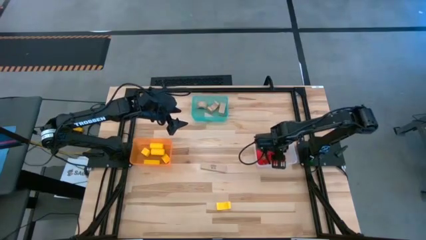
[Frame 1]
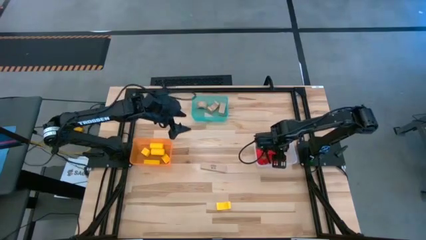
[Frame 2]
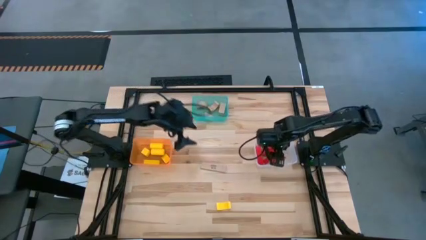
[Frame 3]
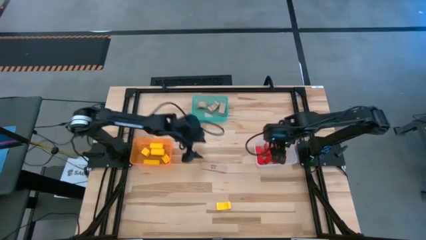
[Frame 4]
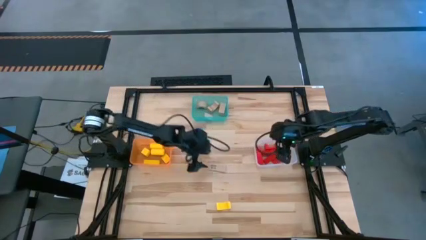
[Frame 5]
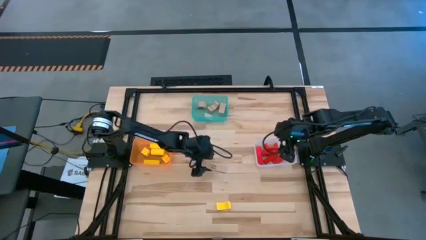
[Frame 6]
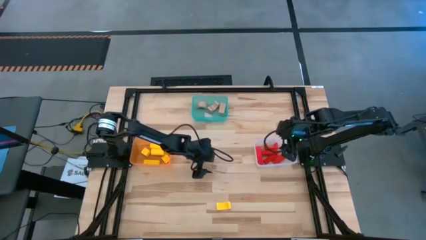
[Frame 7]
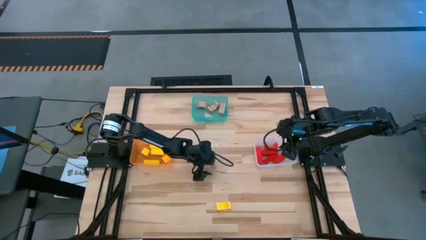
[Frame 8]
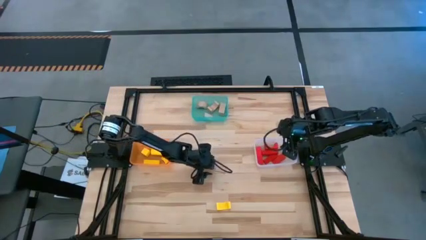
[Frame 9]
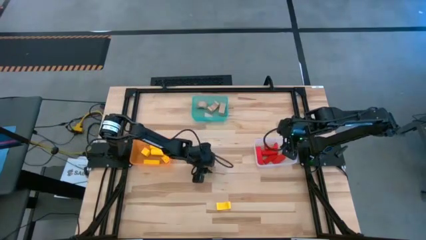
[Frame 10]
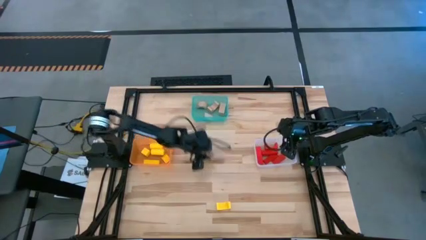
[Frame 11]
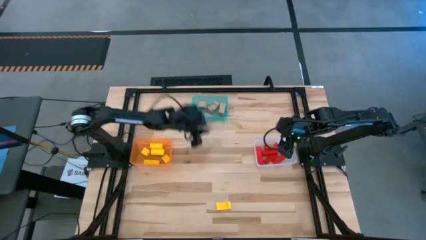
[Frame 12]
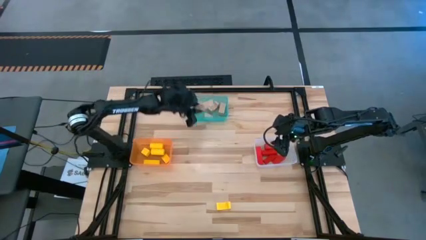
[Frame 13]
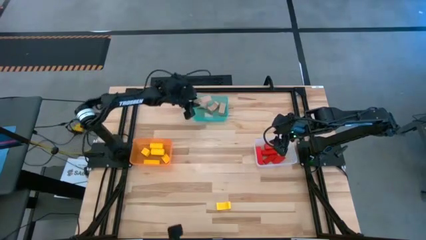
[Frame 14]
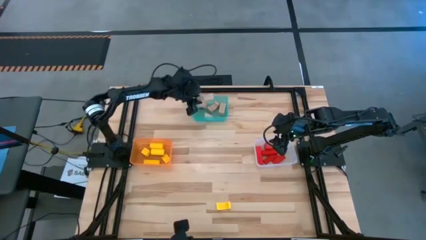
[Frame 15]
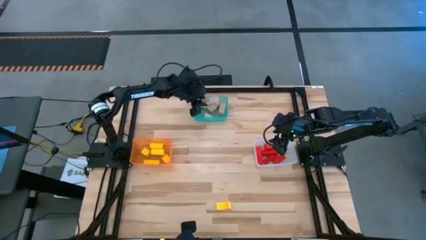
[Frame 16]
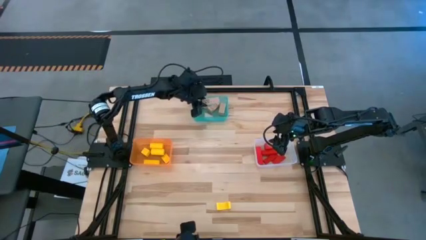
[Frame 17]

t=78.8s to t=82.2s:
Task: Sort & place blocks by color
Put the brown block into the green bin

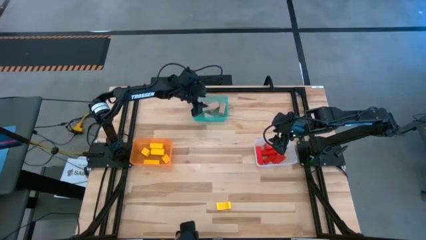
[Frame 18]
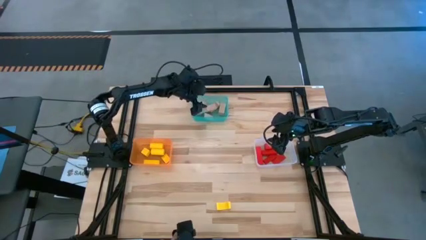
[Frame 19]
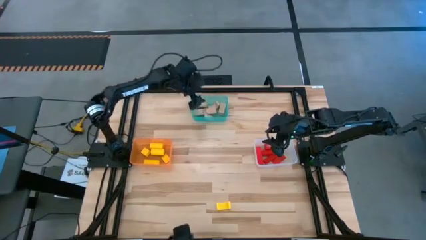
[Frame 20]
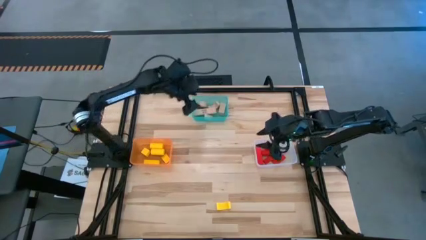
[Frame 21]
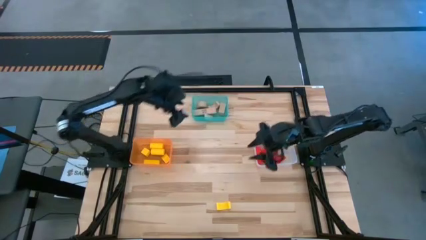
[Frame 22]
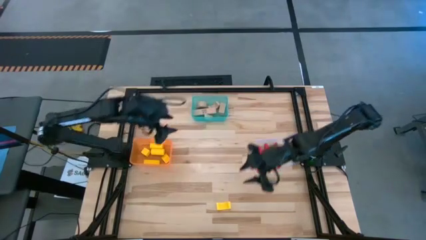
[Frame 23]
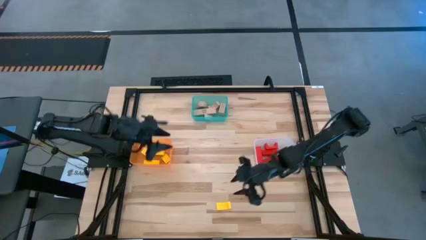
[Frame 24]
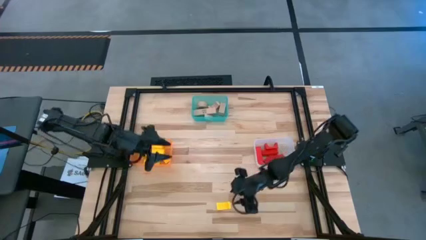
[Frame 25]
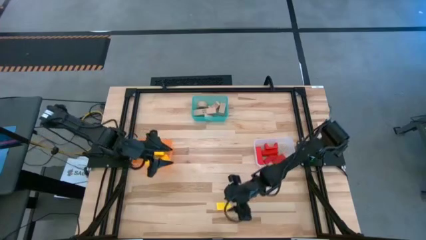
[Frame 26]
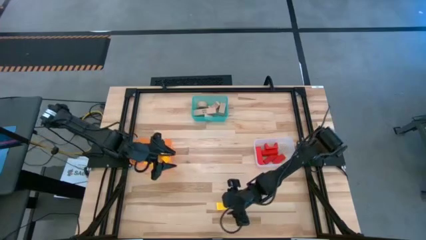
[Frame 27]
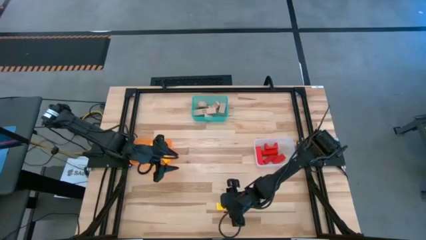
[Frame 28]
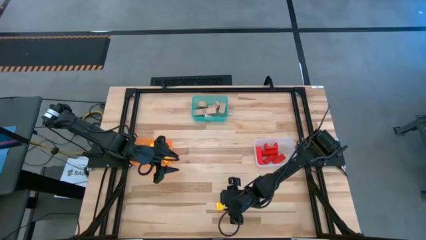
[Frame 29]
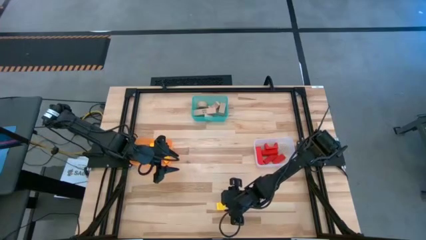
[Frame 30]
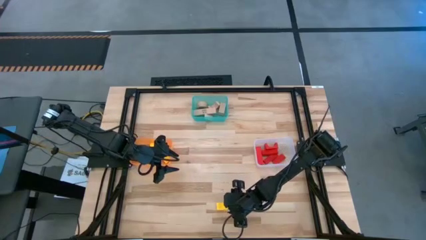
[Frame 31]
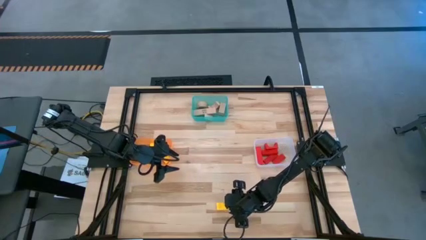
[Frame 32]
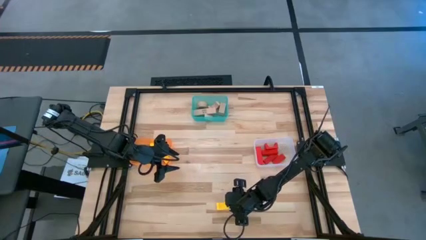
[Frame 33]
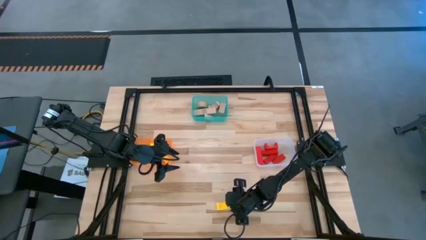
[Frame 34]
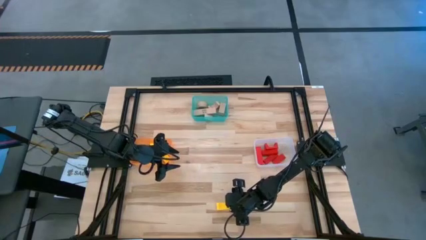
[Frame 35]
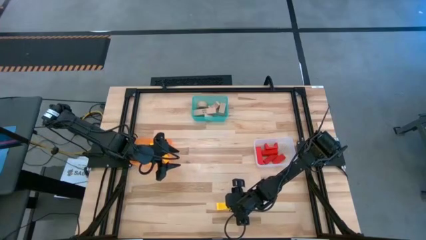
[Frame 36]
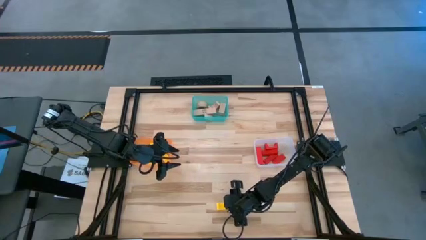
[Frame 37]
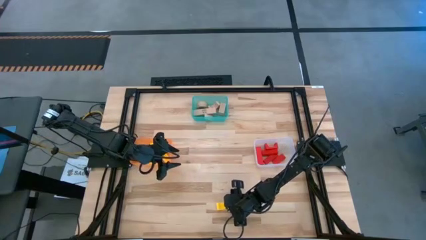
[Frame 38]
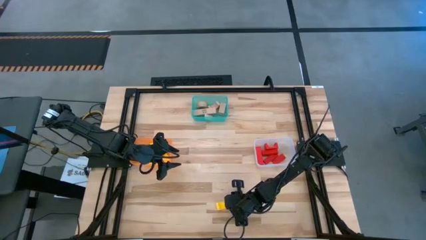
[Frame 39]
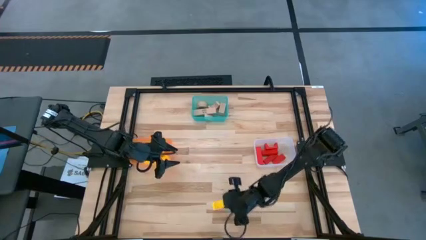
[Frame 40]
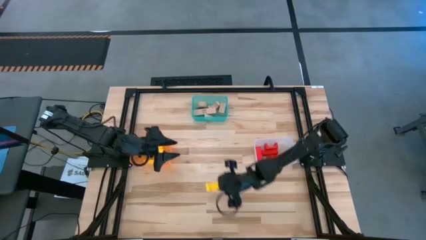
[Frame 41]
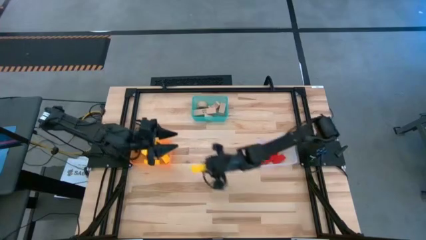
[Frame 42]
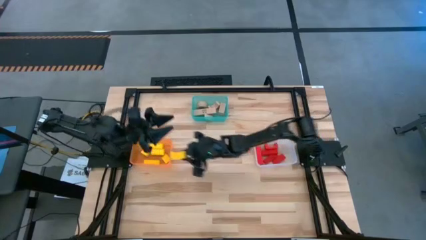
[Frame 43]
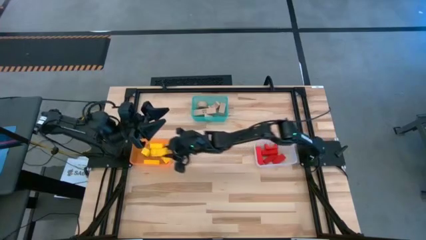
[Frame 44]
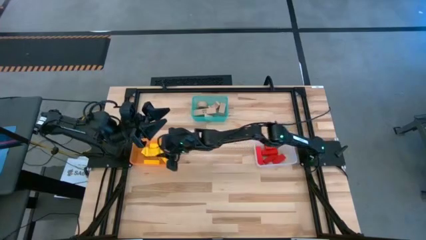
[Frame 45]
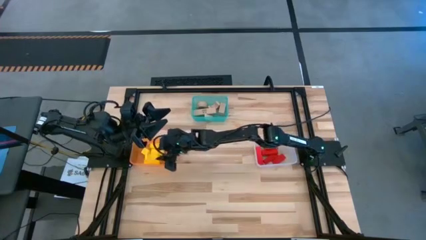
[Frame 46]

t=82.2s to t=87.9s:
Put the yellow block into the orange bin

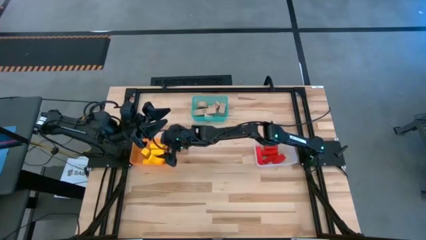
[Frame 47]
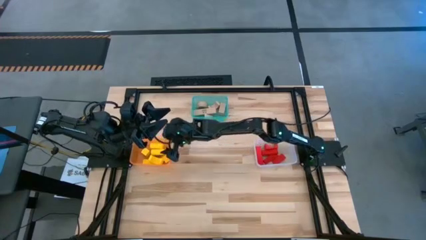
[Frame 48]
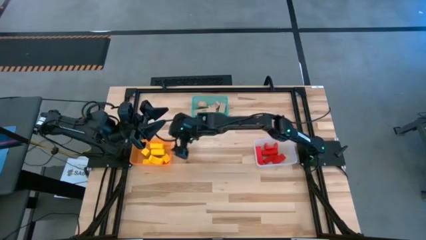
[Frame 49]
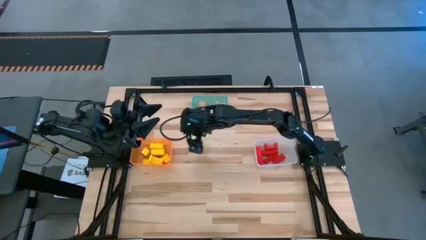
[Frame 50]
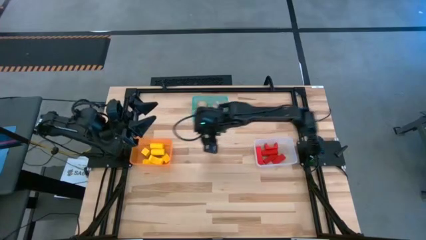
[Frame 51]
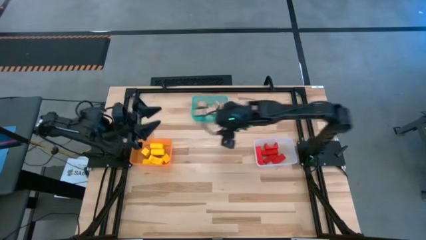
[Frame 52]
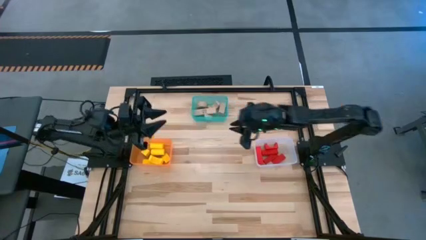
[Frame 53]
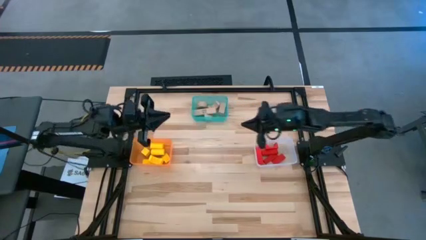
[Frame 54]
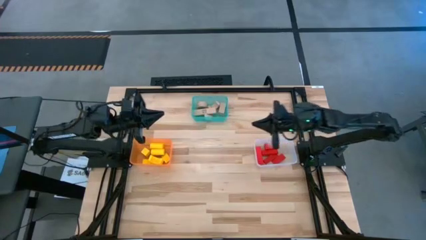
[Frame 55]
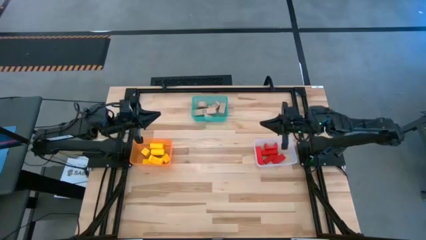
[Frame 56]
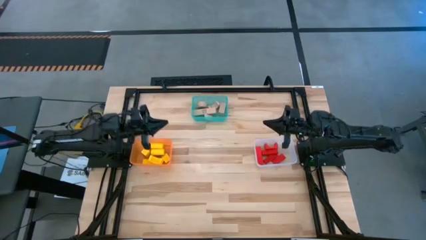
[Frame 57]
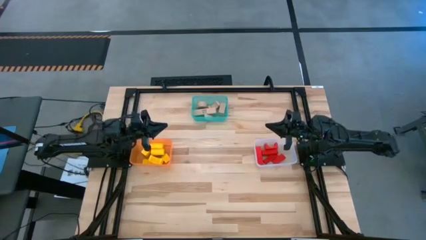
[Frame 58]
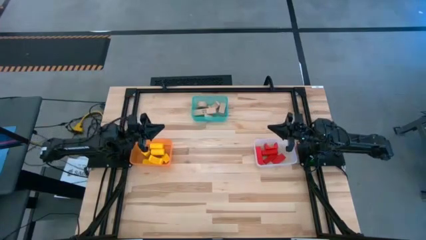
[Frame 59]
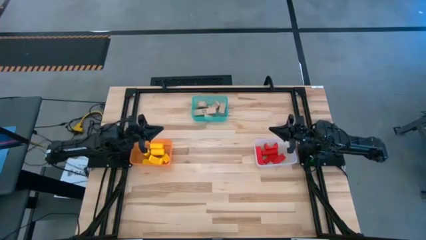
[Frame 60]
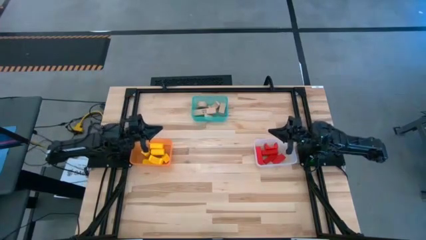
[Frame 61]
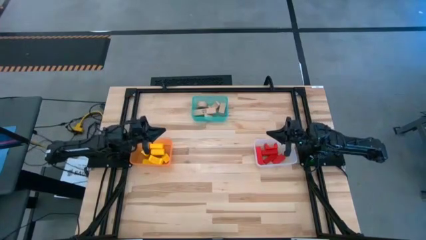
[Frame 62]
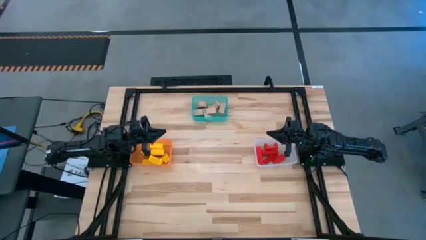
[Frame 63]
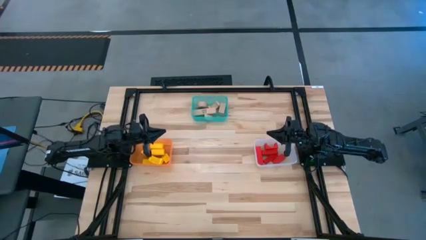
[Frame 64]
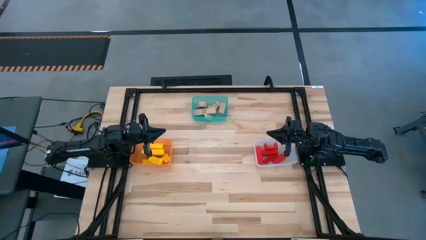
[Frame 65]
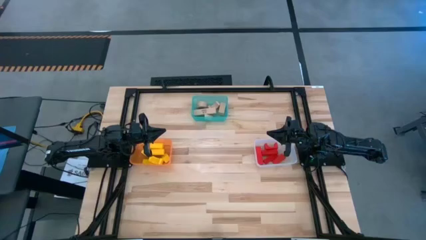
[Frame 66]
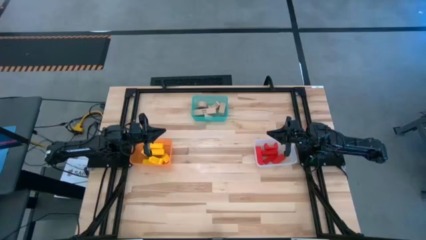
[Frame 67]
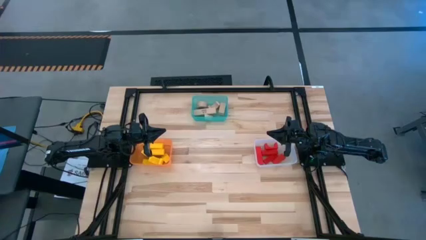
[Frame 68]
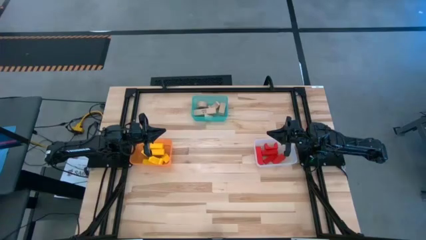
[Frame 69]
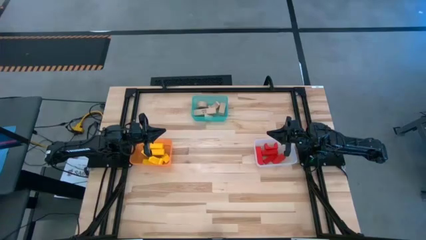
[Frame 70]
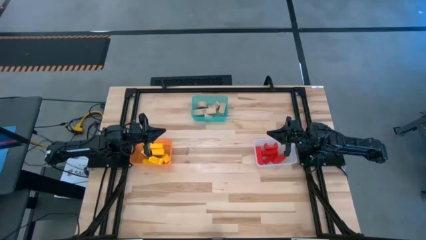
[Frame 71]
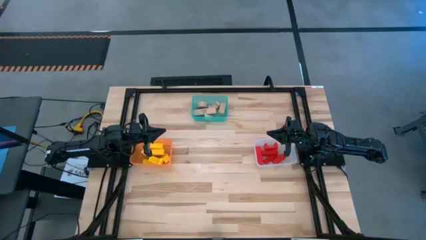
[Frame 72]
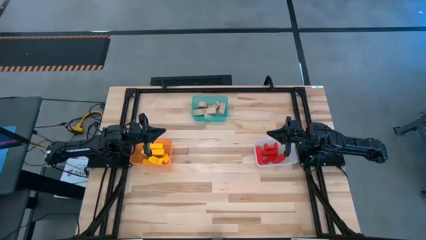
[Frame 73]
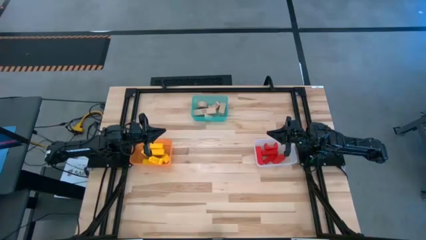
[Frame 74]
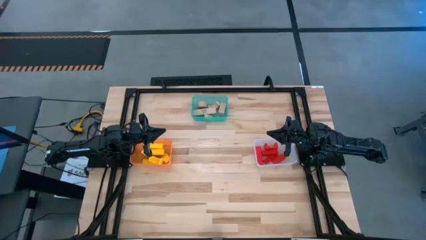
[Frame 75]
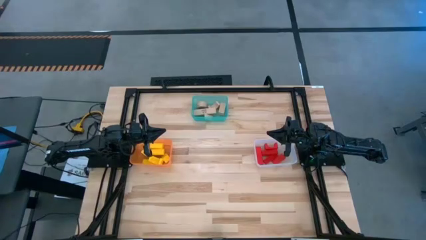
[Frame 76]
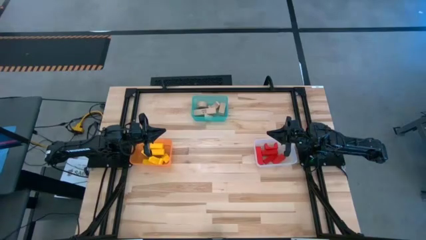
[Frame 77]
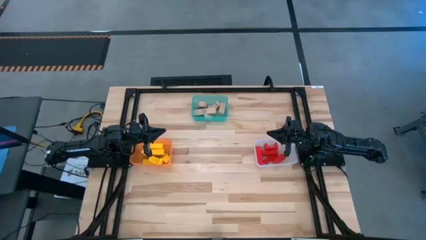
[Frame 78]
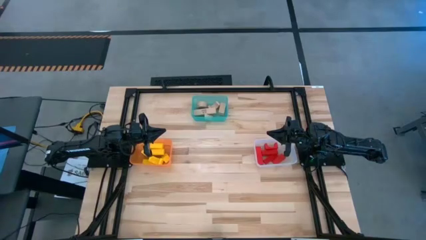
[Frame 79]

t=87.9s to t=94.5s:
Return to Home Position

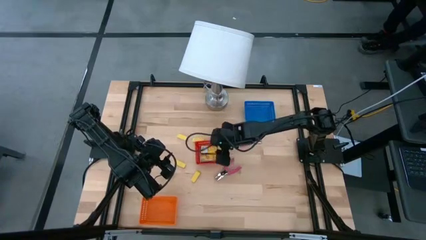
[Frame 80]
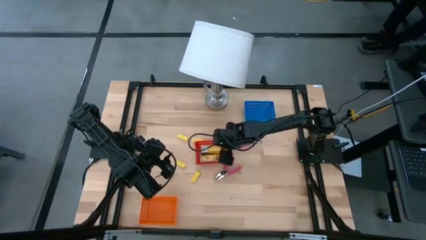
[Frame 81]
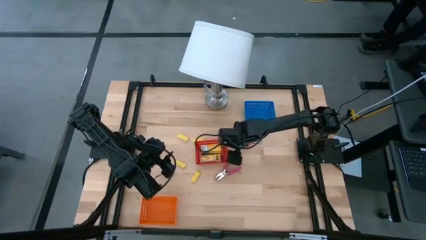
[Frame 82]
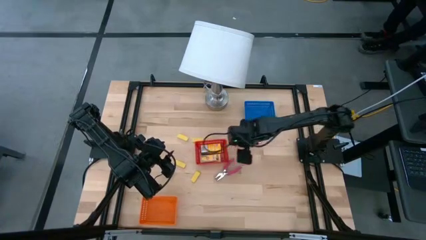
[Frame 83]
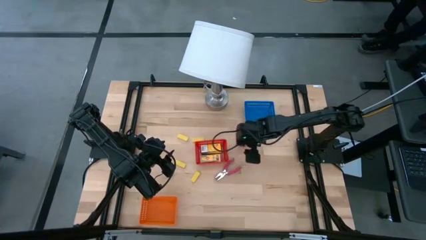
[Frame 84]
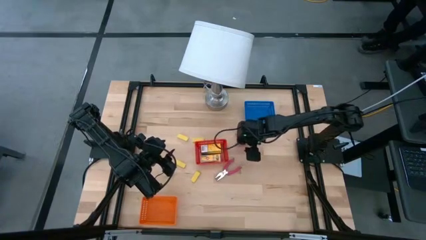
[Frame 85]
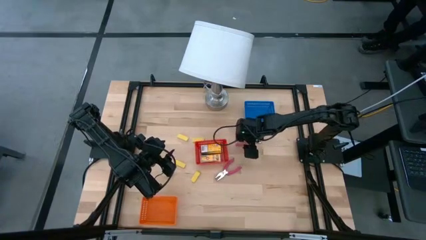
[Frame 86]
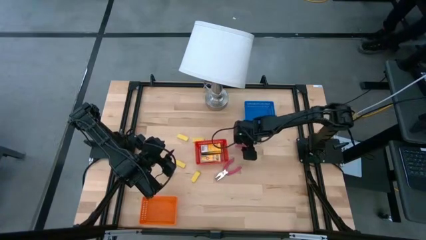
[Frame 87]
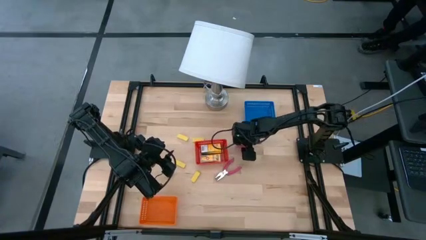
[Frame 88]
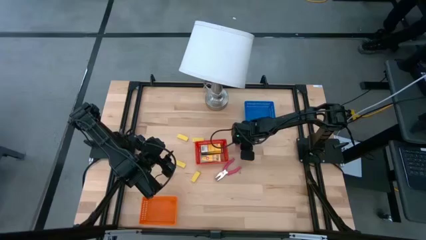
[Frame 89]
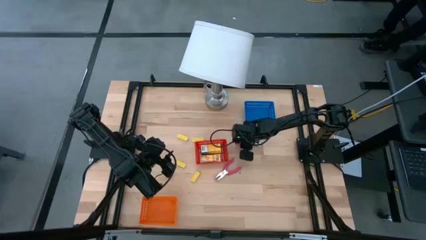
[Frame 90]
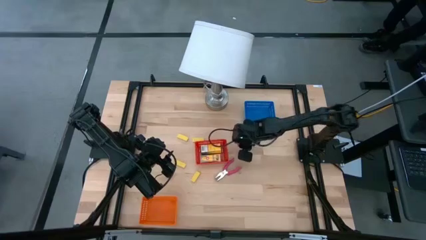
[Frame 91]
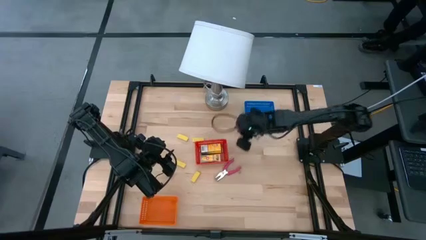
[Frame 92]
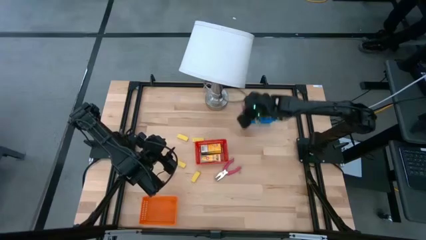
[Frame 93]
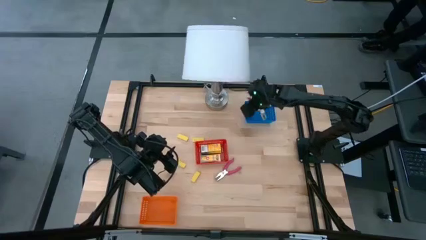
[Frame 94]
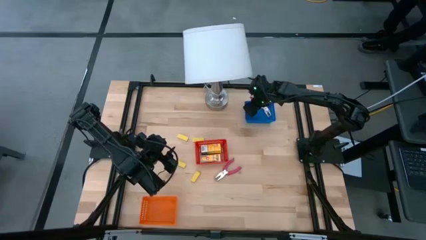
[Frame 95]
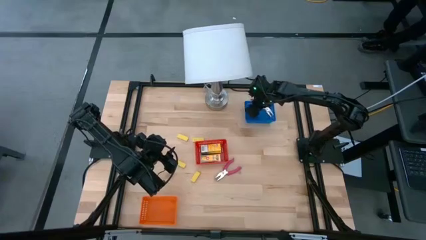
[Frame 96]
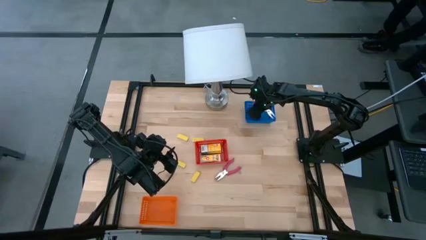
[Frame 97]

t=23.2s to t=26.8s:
Task: Pick & Place School Supplies
Put the pink hole puncher into the blue bin
